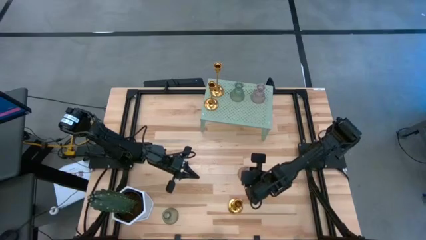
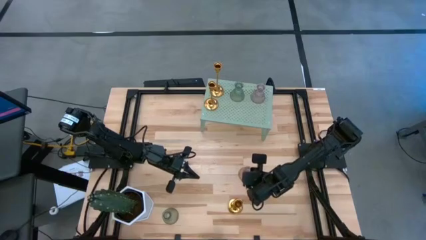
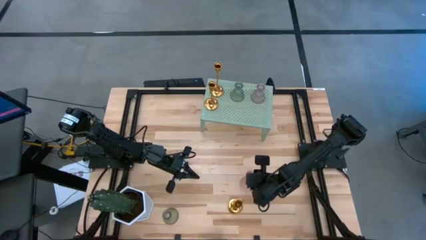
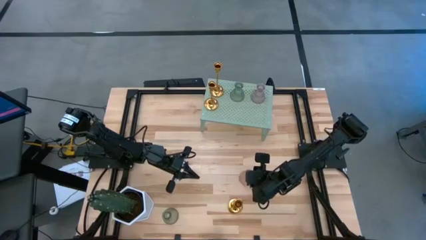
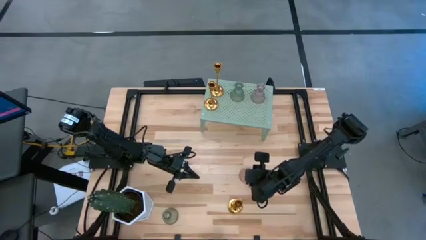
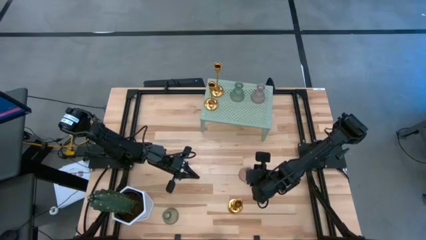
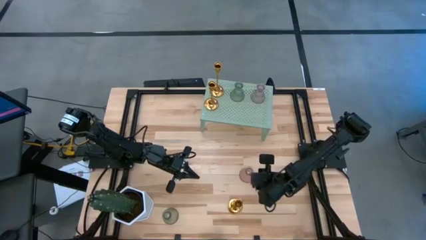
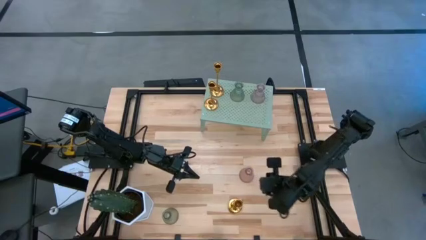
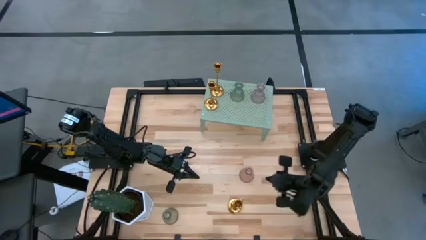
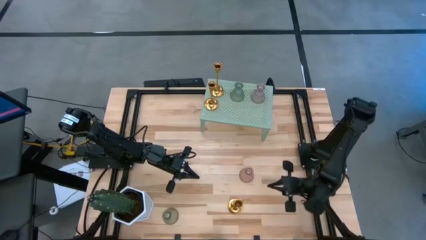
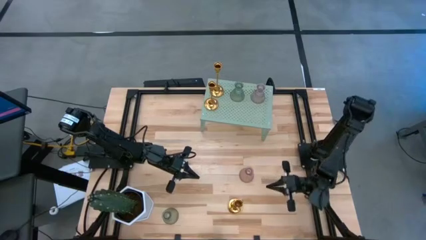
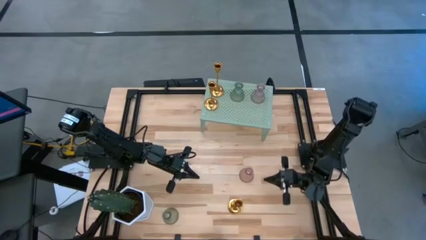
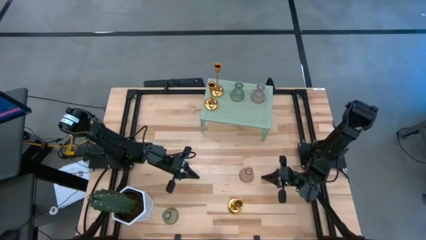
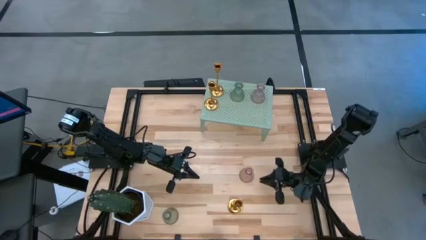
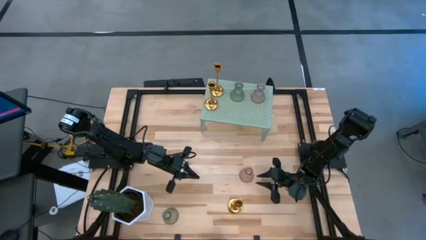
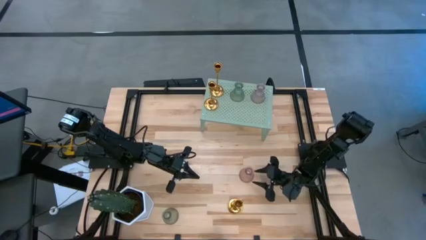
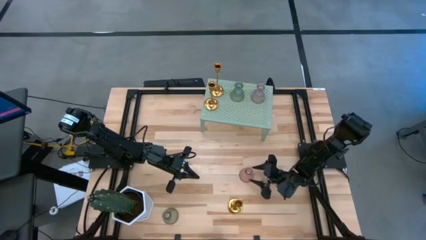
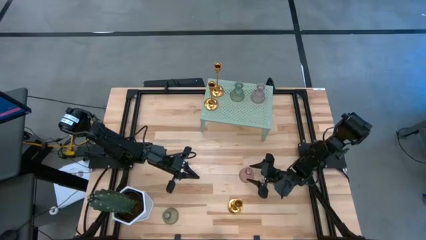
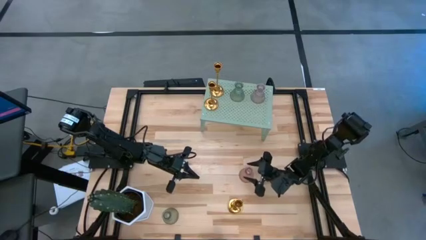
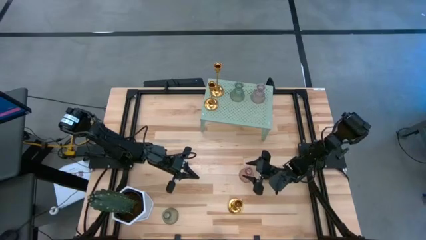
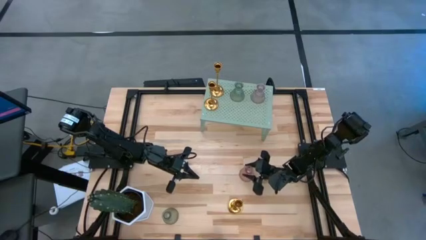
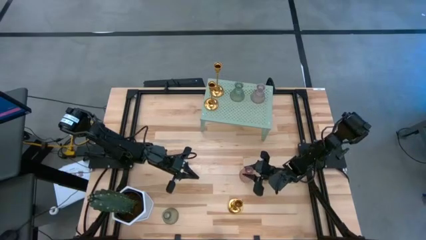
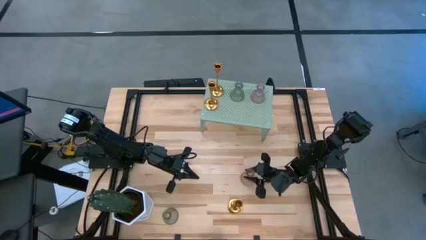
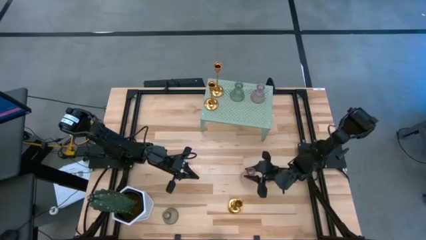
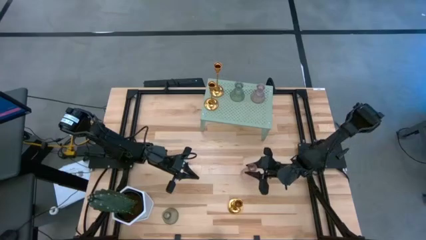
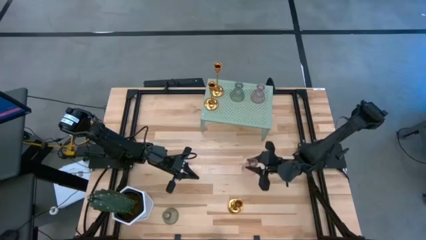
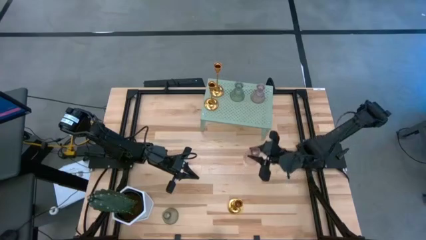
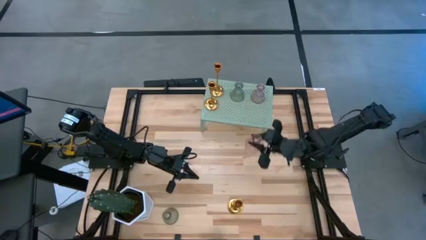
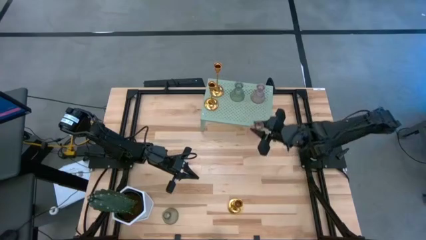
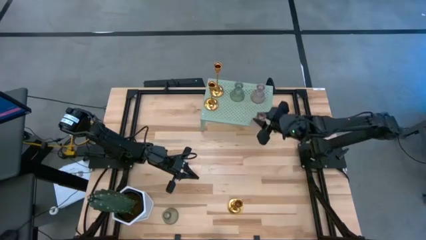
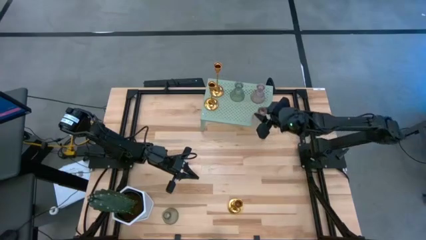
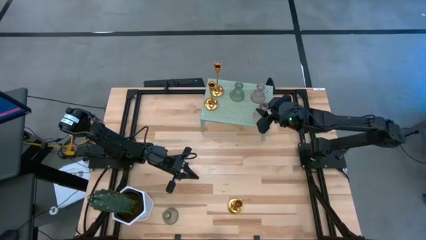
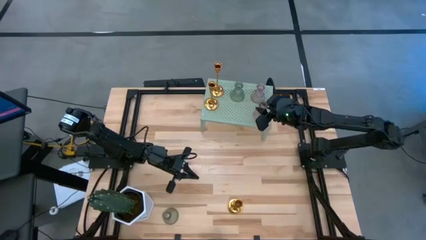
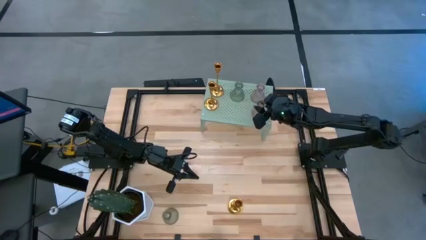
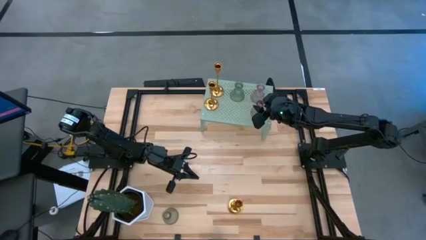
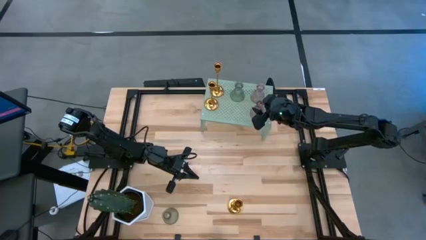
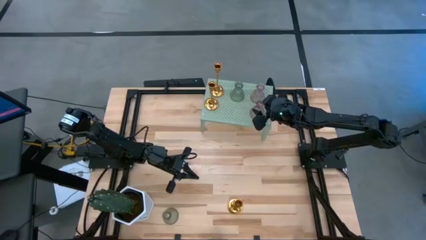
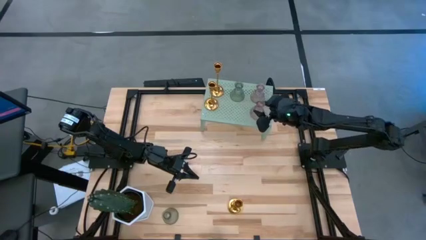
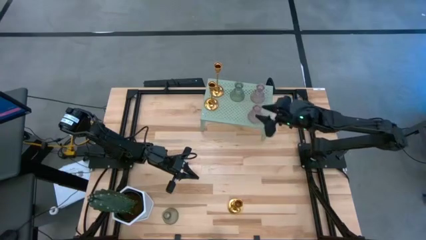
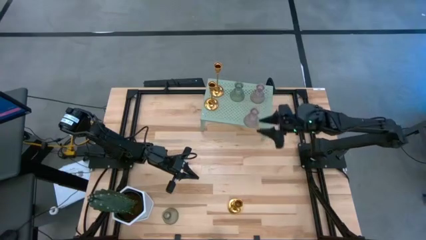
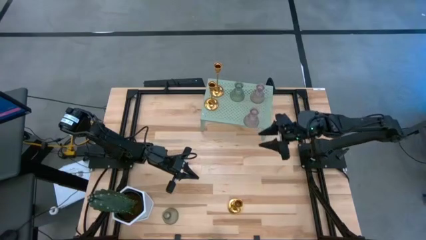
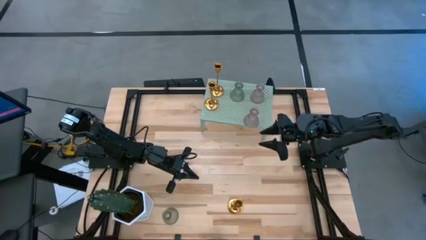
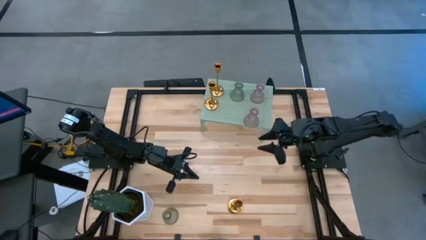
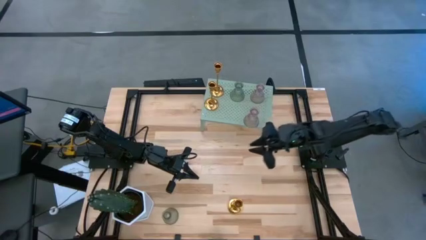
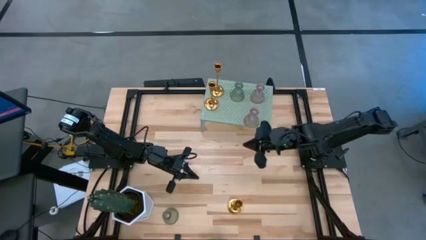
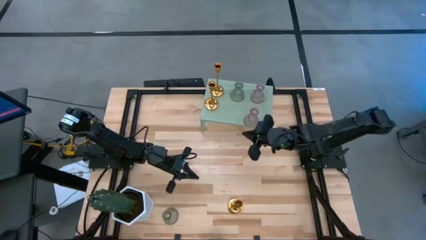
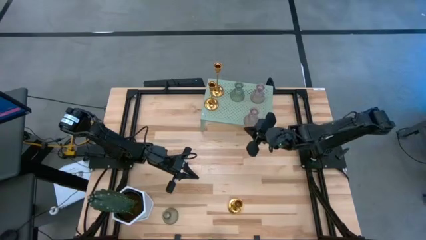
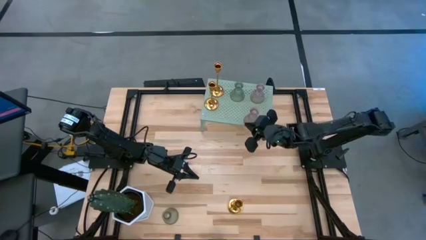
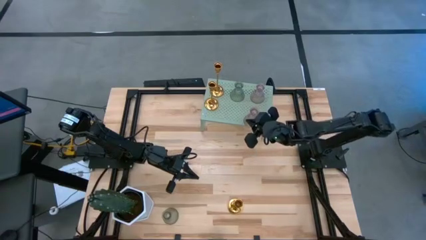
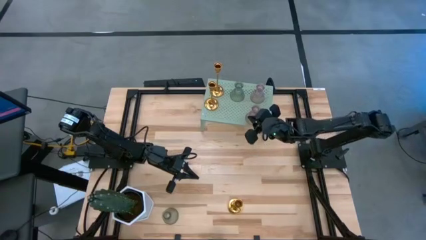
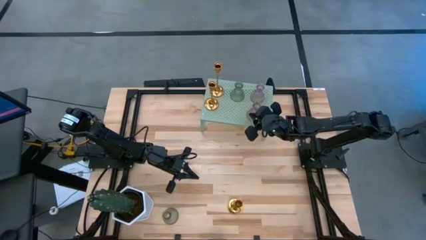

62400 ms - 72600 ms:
Task: Pick & Place candle stick holders
Put the purple glass candle holder on the shelf aligned with the other purple candle holder
